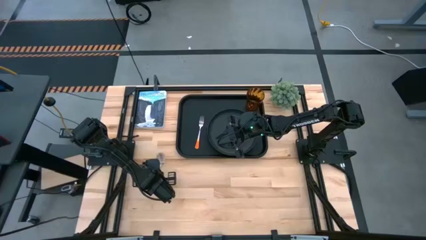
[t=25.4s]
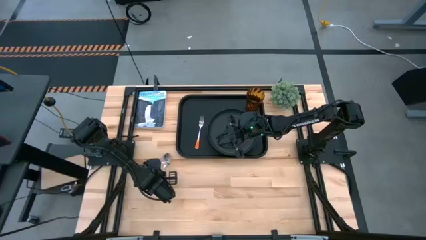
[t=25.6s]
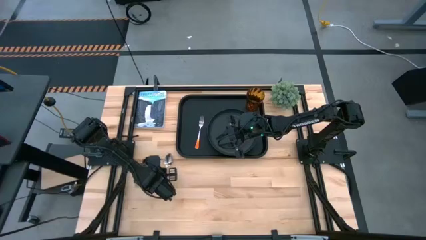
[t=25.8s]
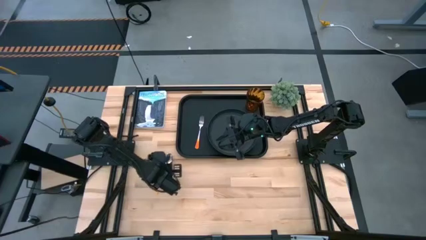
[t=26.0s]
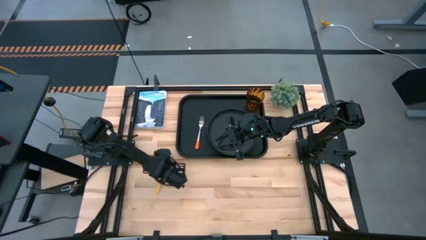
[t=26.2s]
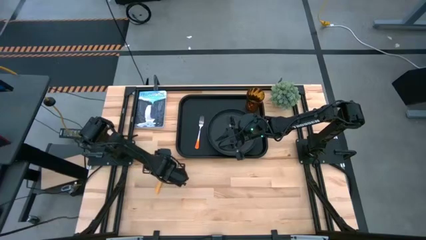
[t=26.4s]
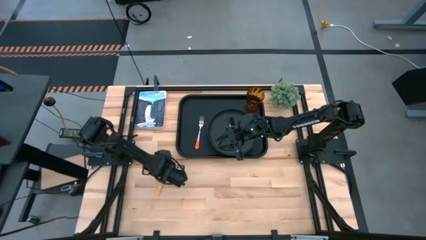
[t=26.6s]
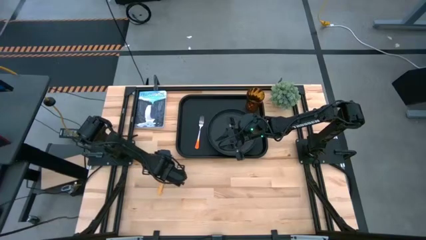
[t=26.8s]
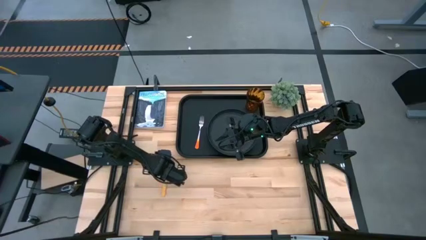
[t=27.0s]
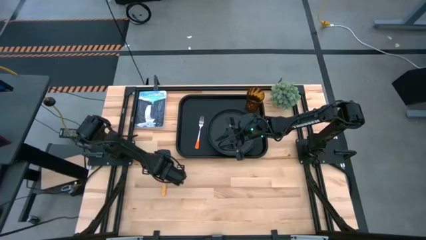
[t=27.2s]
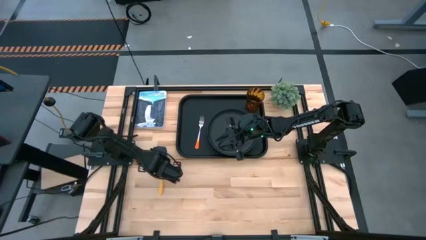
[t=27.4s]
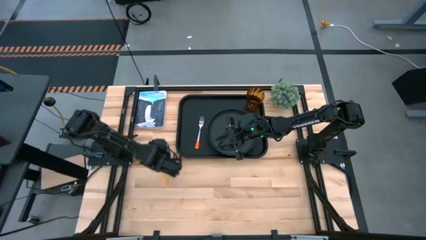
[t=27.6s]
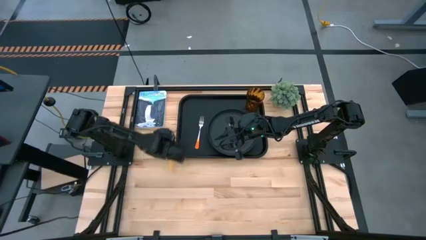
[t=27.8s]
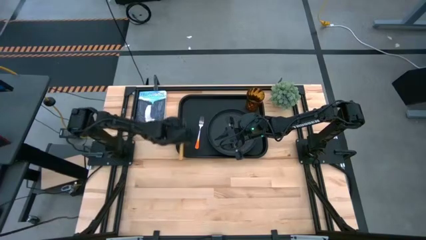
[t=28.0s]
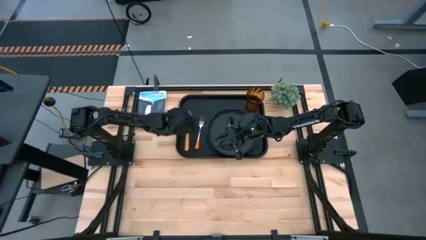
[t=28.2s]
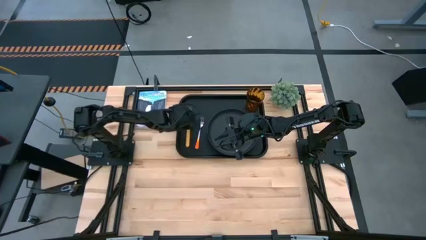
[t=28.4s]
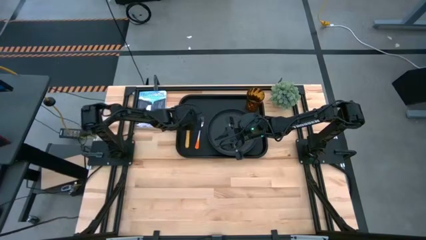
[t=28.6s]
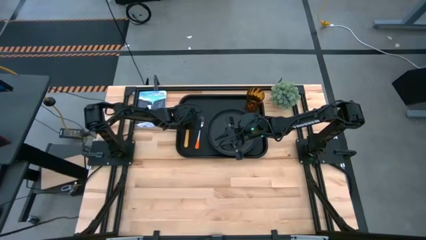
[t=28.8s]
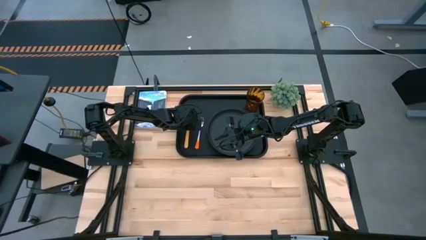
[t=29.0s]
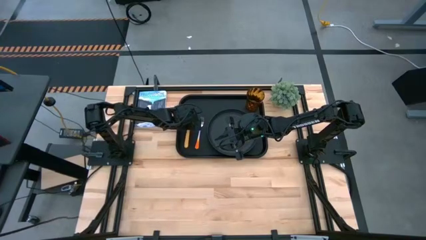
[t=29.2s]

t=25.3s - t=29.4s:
Task: Pick and place plate/cup/fork/spoon on tray
Put the yellow spoon on the black serving tray to the left of the orange fork

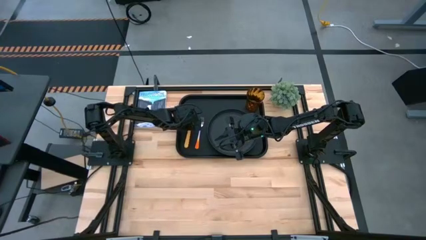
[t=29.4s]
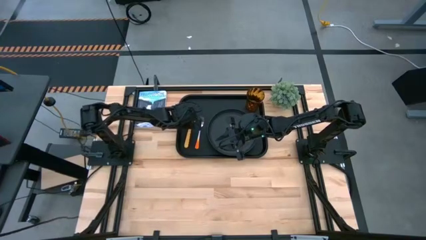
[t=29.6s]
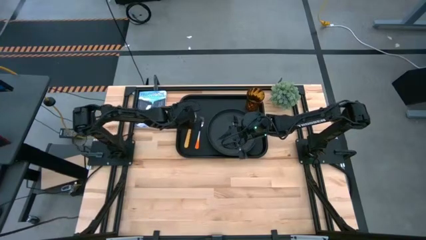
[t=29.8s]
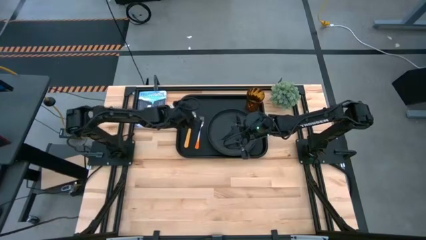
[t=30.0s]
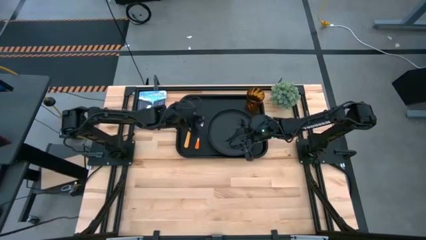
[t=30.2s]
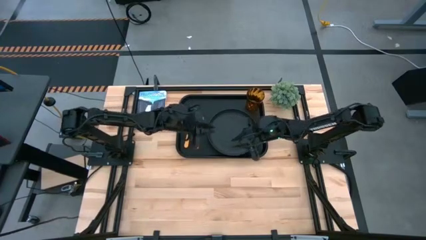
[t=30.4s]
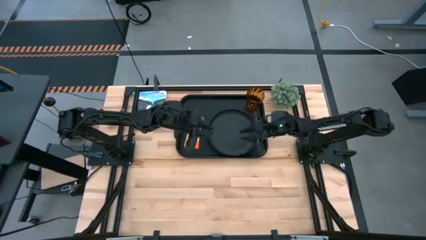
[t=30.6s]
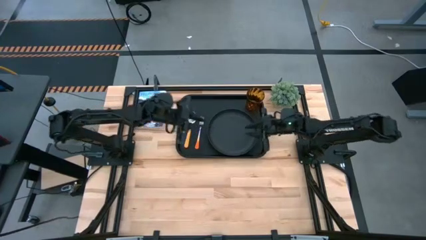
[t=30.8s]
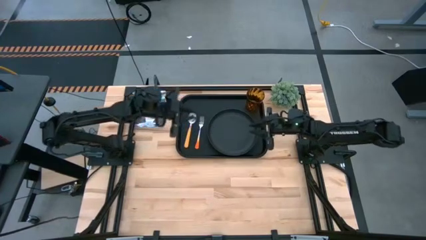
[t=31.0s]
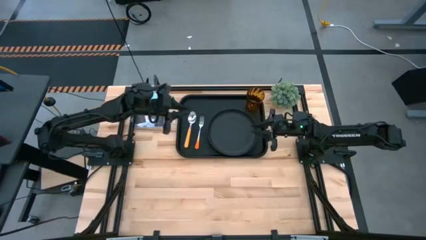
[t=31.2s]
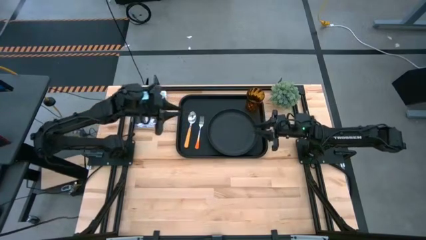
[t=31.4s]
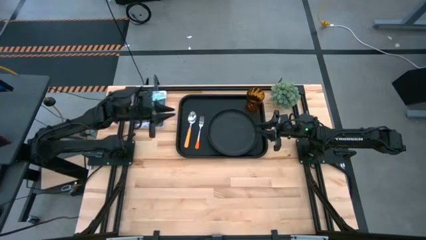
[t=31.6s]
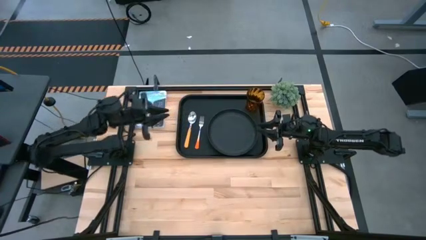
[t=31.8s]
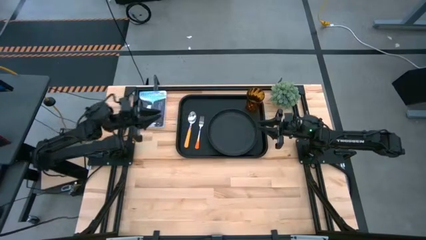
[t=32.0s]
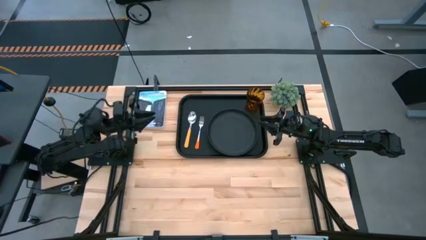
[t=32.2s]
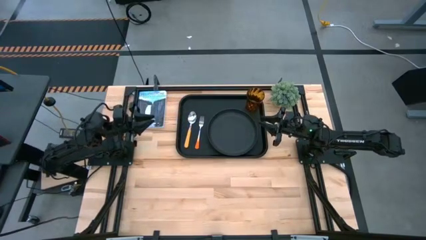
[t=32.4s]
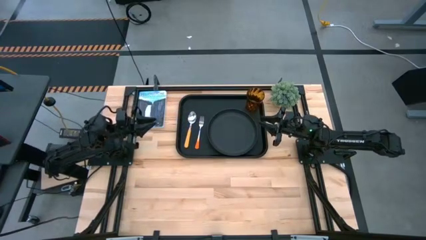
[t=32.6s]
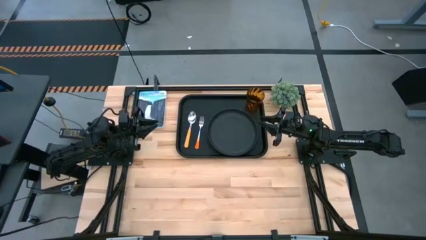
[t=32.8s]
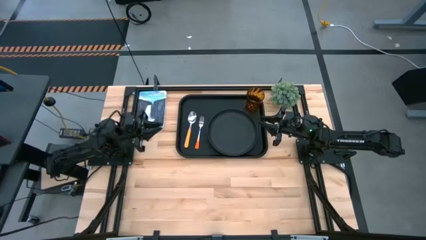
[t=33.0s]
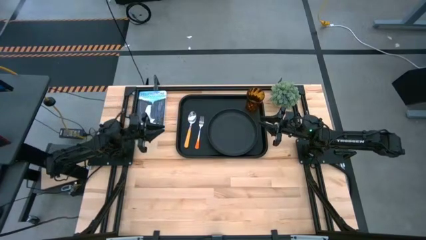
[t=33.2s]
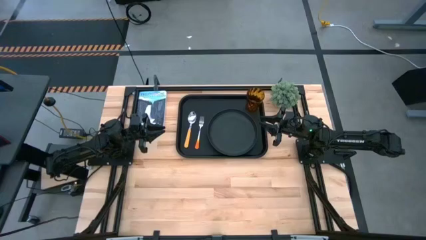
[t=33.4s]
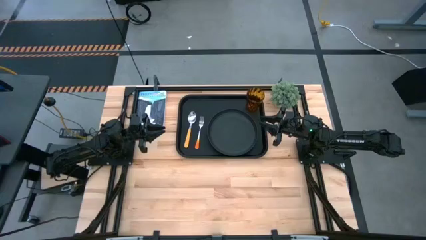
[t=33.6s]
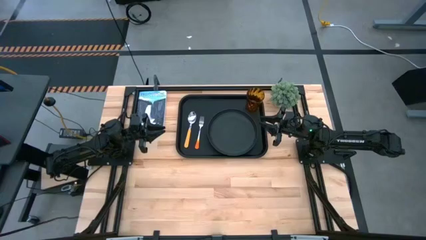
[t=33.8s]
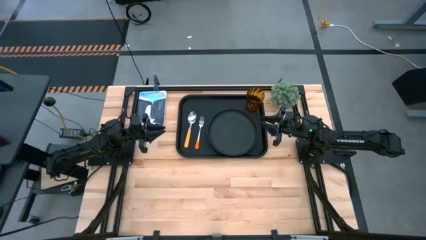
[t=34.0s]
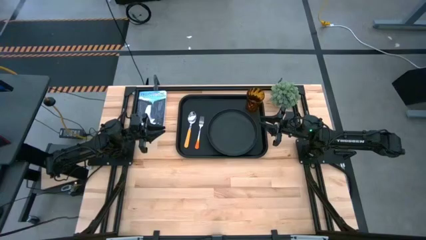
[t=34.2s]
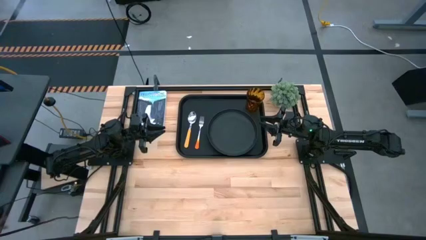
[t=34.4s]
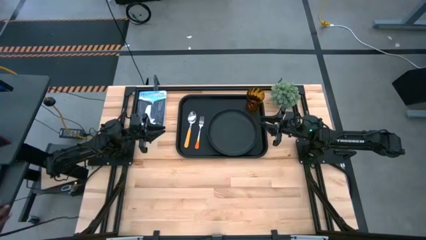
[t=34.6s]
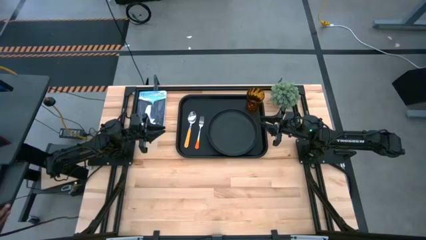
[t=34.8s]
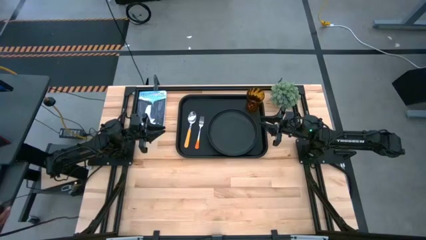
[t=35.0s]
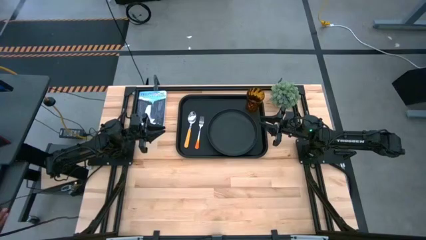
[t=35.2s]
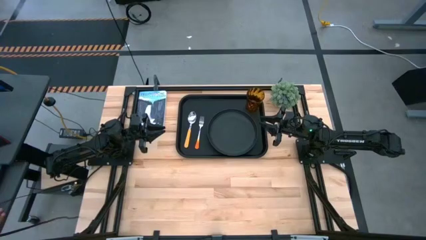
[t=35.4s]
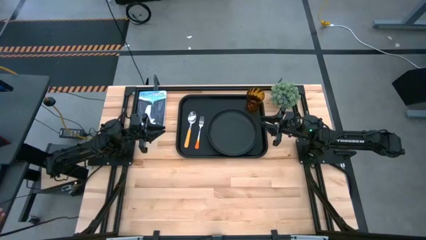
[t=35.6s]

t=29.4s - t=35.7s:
Return to Home Position

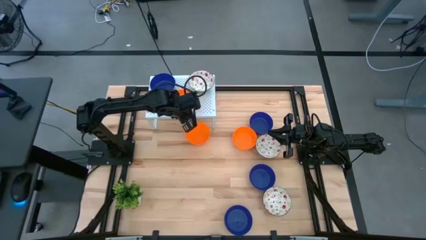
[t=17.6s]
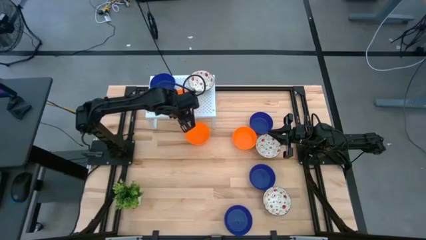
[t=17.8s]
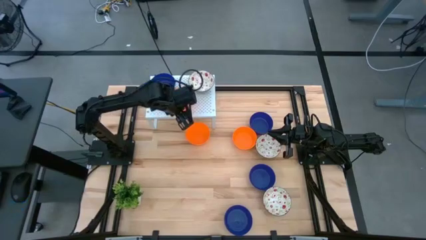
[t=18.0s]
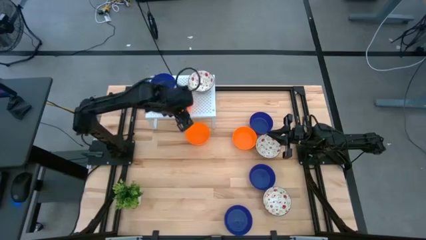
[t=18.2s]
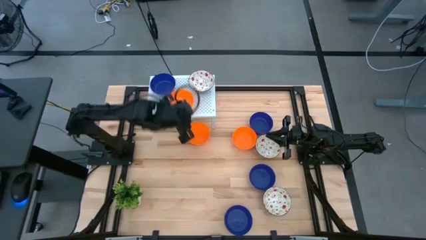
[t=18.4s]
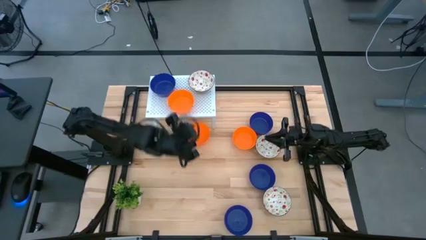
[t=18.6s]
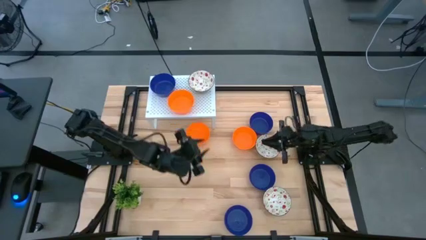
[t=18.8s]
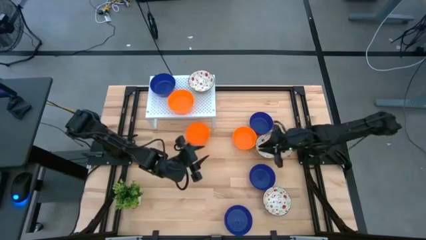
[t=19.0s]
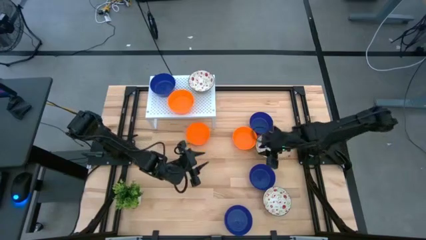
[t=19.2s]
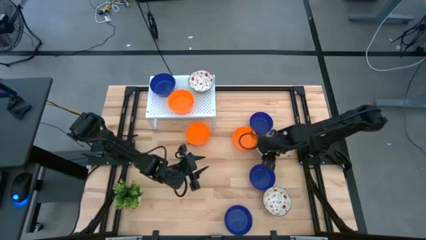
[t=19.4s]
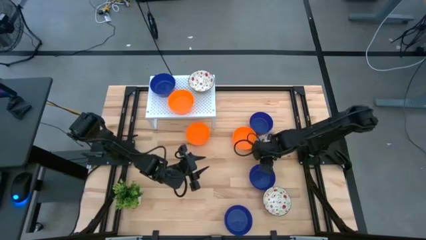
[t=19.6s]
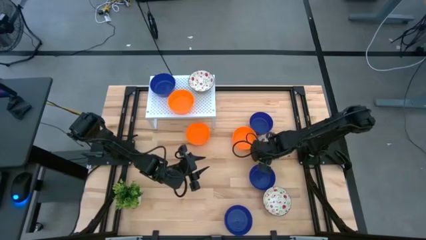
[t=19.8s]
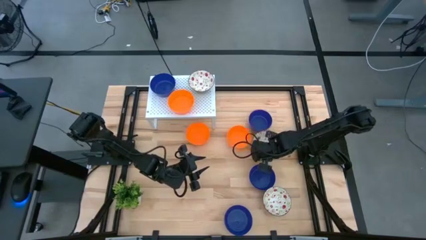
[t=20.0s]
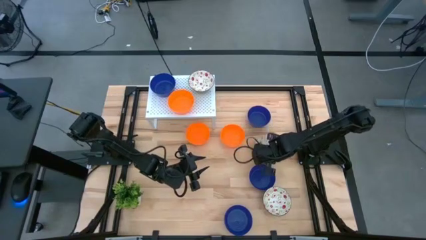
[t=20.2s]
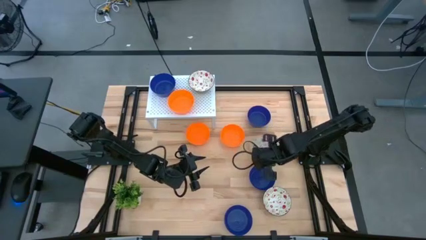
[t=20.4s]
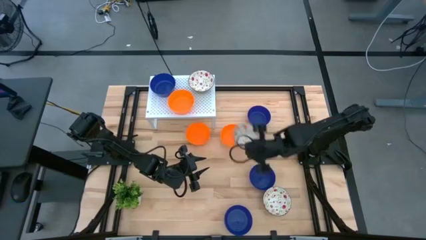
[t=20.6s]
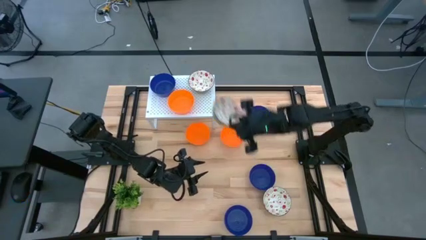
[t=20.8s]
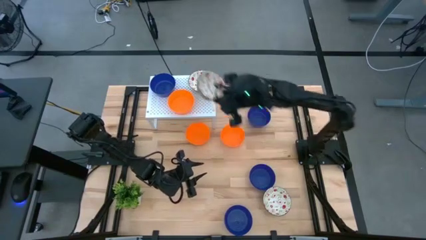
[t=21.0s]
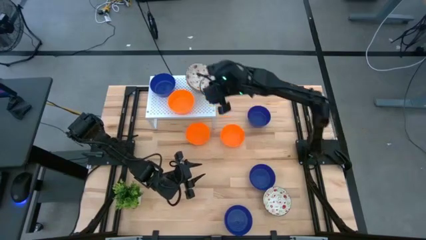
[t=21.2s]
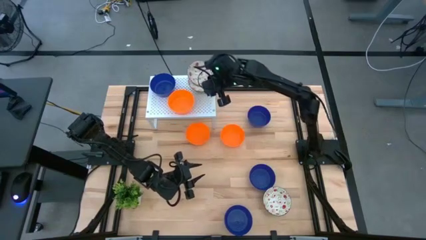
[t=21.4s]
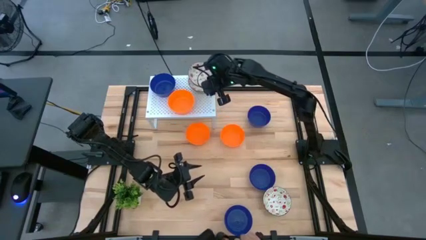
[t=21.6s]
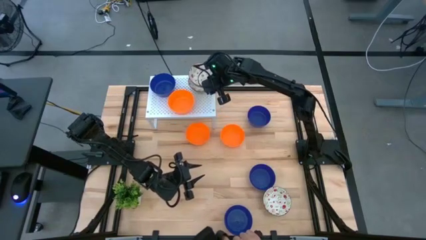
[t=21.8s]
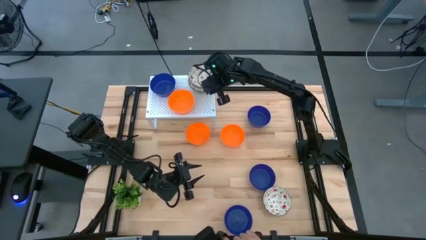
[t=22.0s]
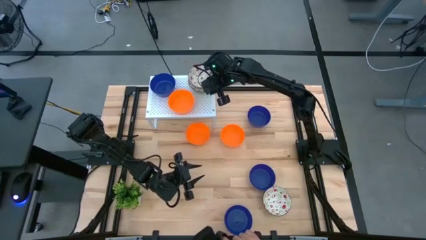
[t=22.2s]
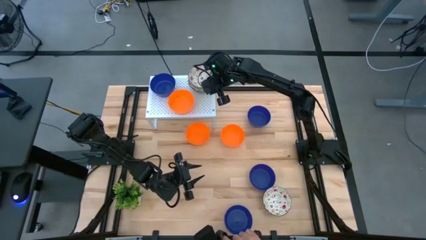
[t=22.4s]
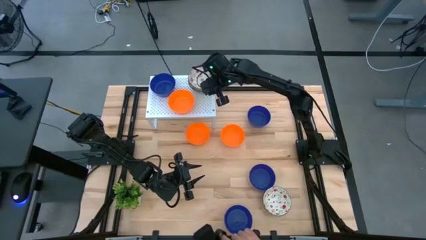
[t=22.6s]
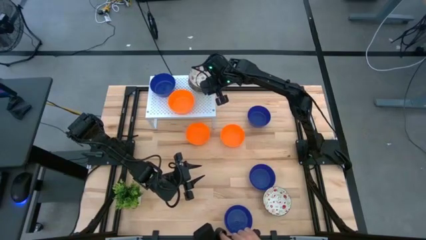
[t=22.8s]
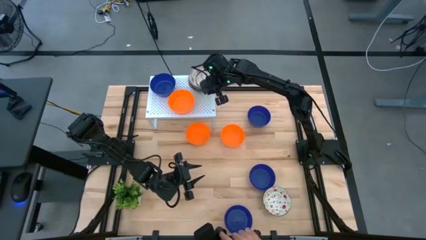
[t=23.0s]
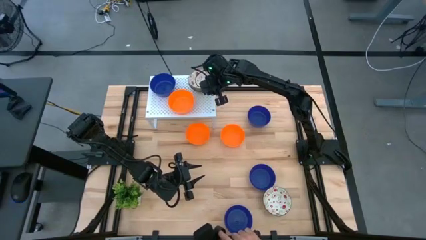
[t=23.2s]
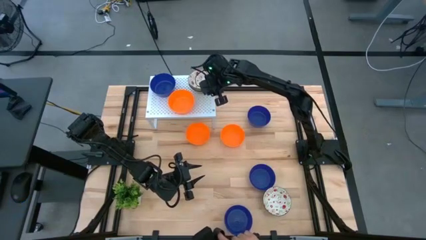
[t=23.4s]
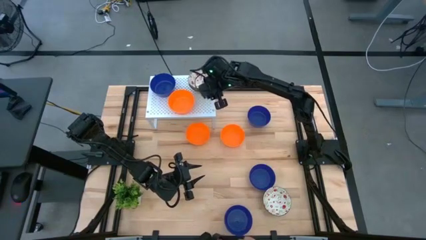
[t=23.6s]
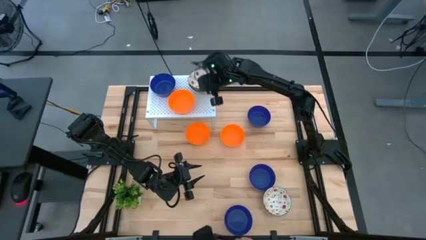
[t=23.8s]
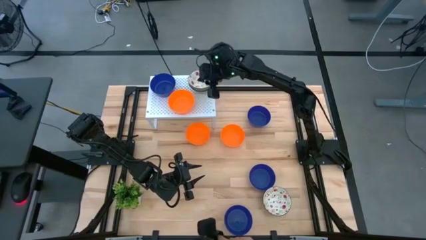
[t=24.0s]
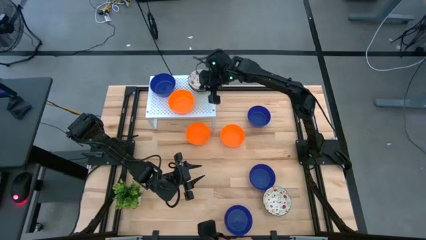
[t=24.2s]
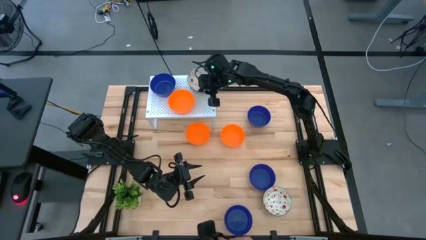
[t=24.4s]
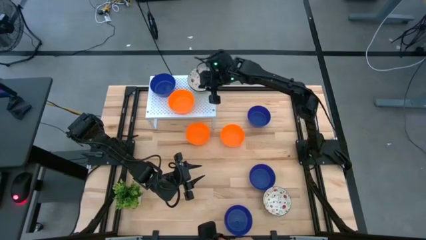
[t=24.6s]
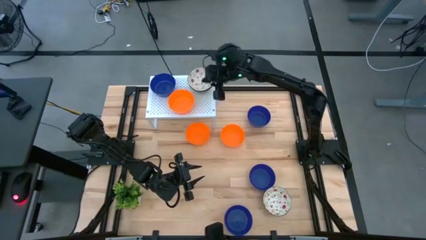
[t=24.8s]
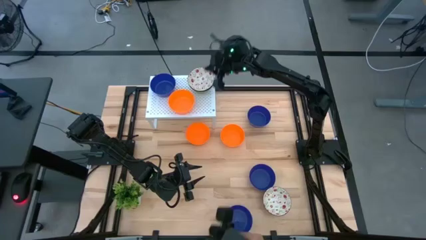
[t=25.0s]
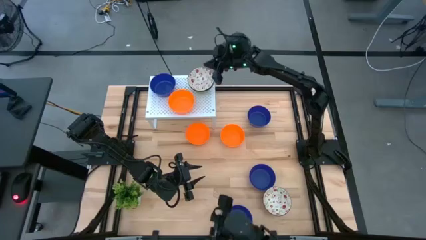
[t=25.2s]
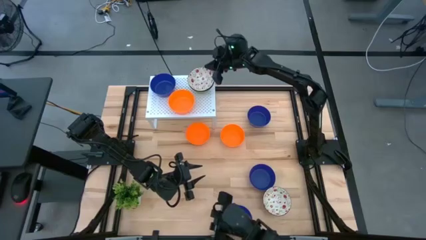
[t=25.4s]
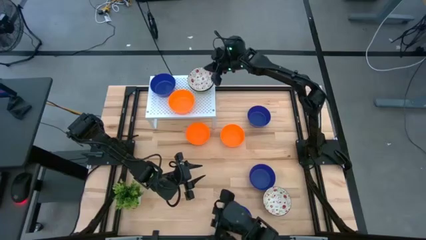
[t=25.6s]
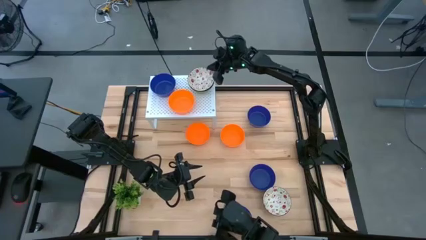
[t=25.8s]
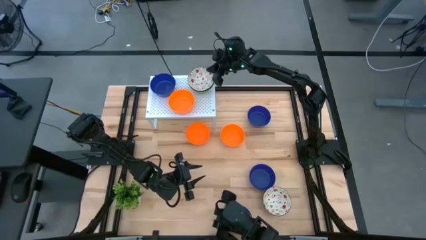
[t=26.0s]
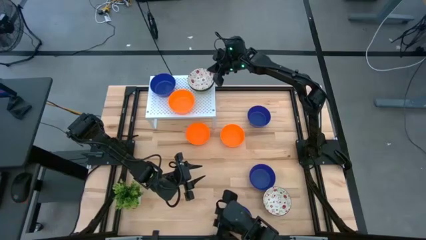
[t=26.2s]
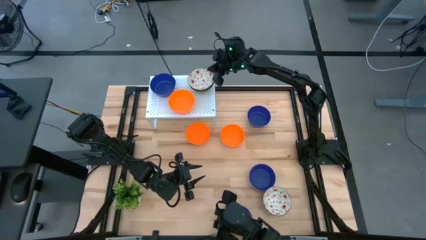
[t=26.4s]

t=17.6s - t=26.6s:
Task: Pick & Place Mini bowls
Stack the white bowl on top of the white bowl on the shelf
